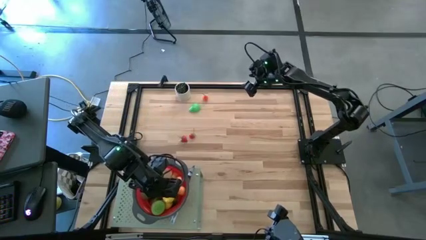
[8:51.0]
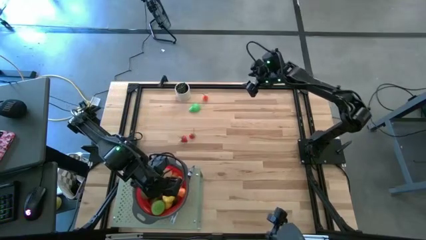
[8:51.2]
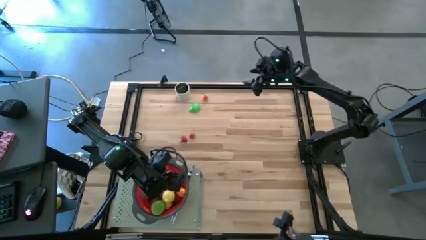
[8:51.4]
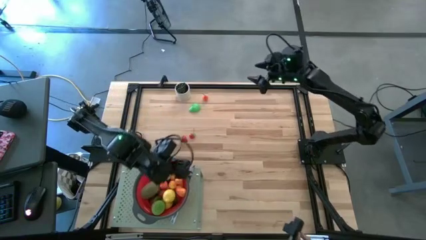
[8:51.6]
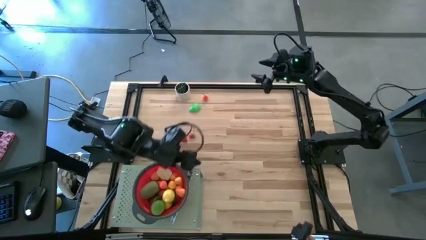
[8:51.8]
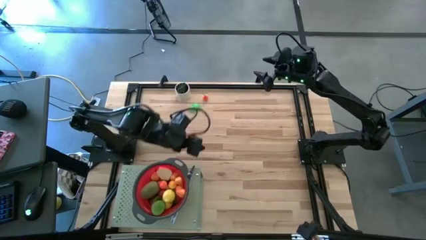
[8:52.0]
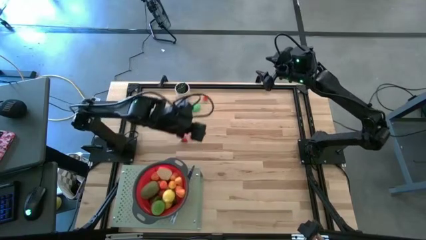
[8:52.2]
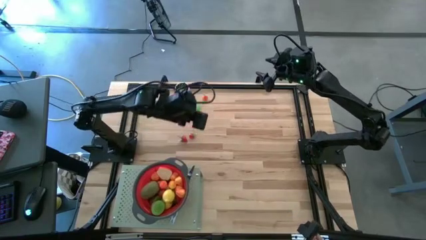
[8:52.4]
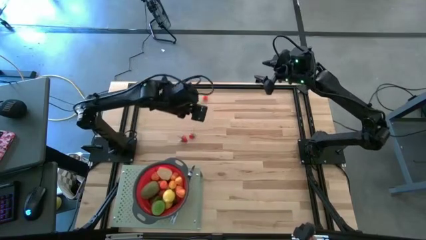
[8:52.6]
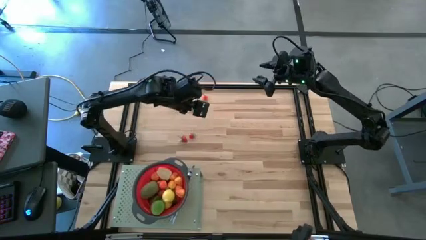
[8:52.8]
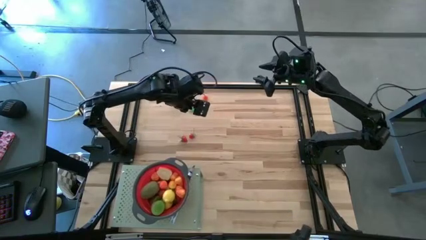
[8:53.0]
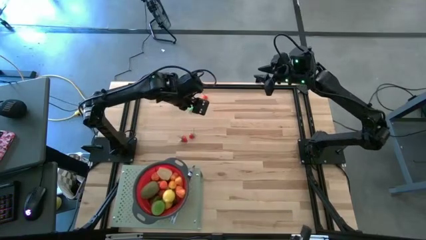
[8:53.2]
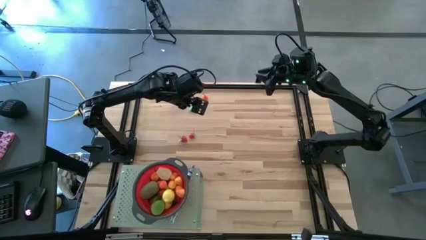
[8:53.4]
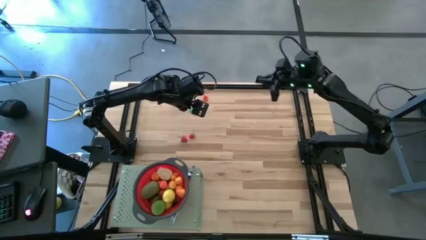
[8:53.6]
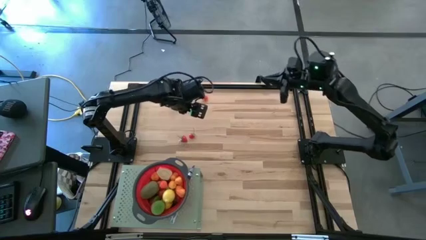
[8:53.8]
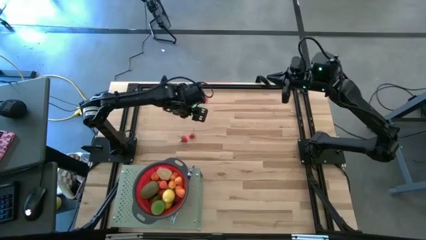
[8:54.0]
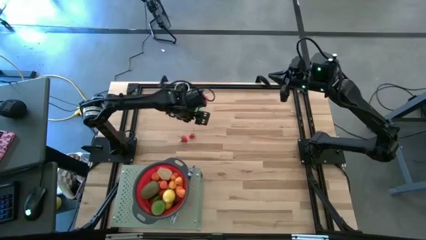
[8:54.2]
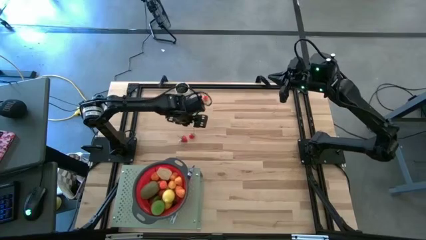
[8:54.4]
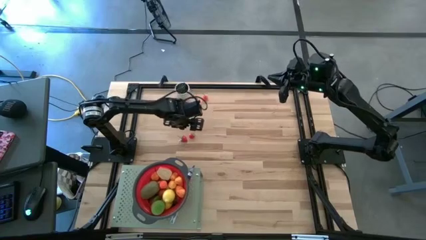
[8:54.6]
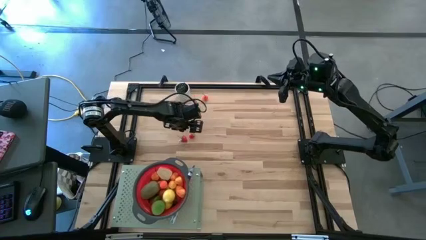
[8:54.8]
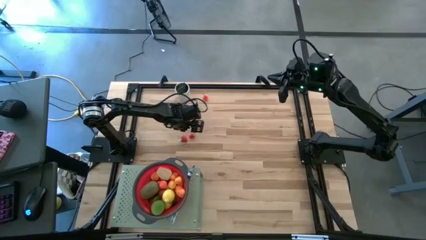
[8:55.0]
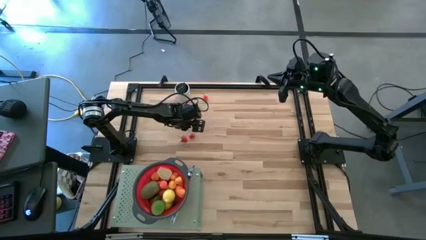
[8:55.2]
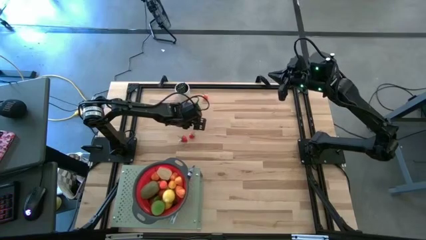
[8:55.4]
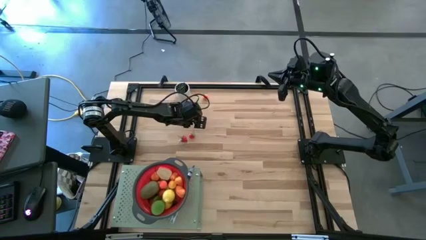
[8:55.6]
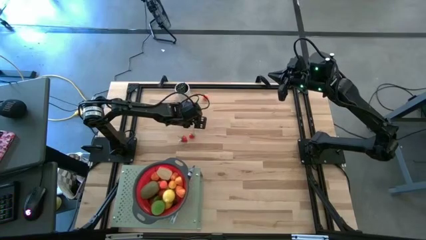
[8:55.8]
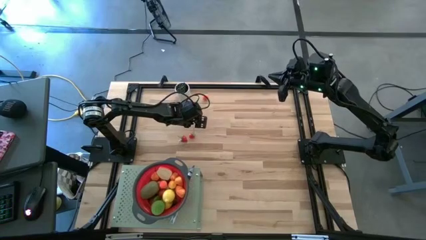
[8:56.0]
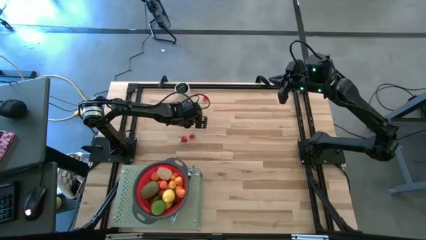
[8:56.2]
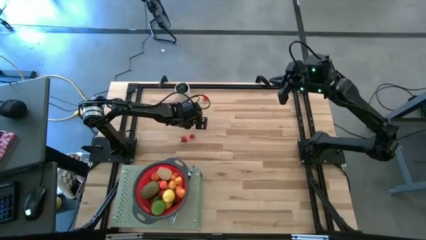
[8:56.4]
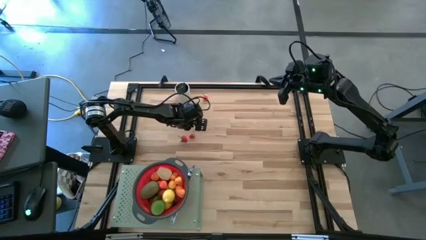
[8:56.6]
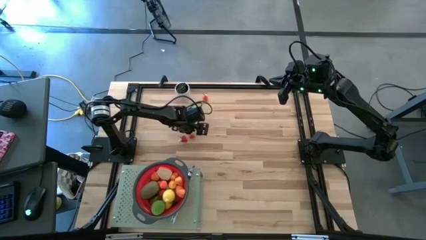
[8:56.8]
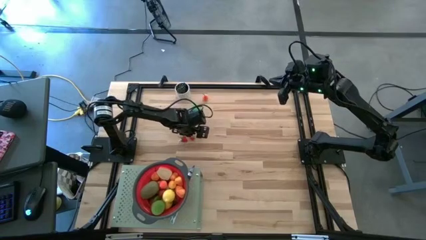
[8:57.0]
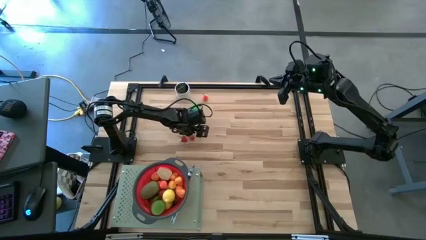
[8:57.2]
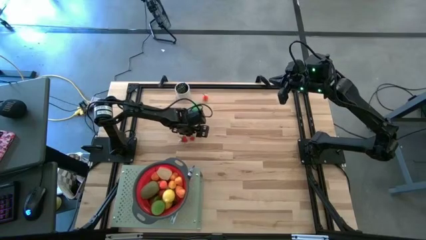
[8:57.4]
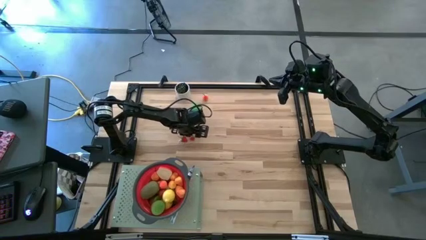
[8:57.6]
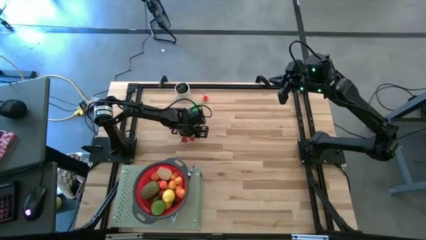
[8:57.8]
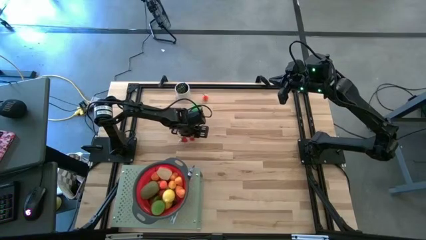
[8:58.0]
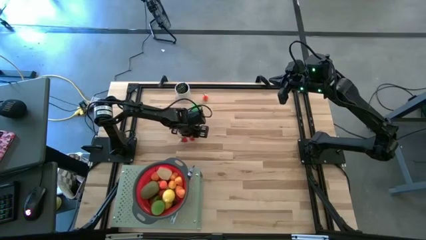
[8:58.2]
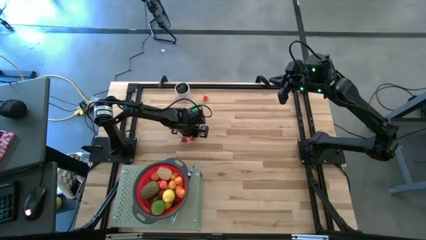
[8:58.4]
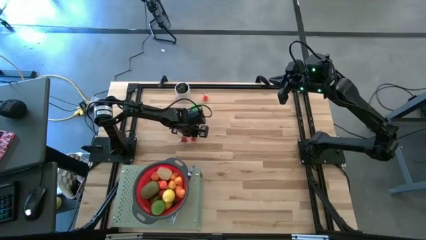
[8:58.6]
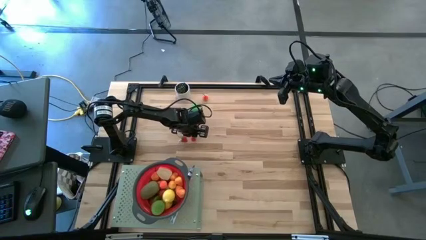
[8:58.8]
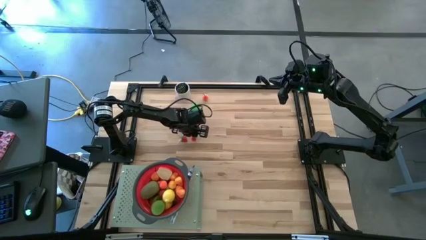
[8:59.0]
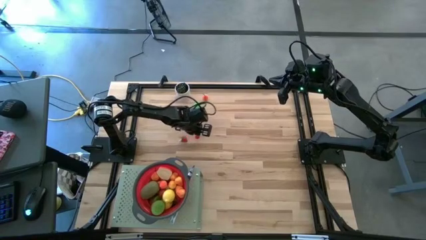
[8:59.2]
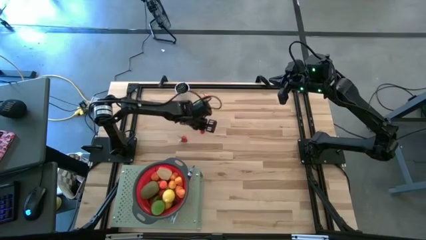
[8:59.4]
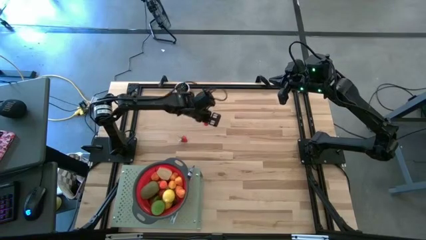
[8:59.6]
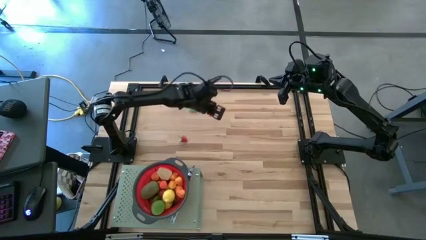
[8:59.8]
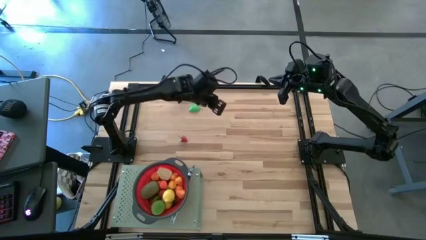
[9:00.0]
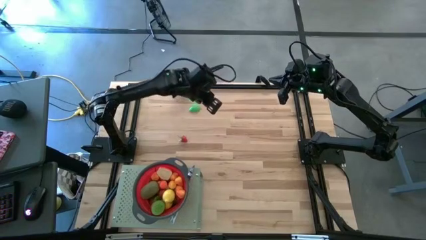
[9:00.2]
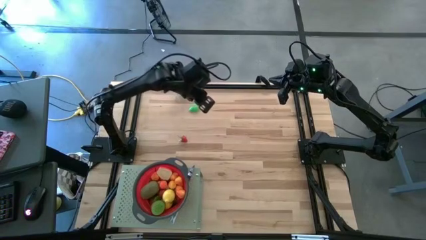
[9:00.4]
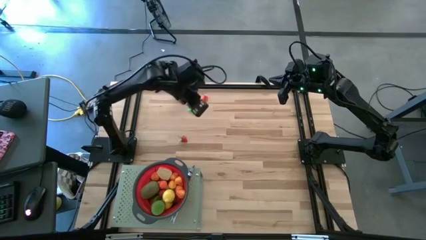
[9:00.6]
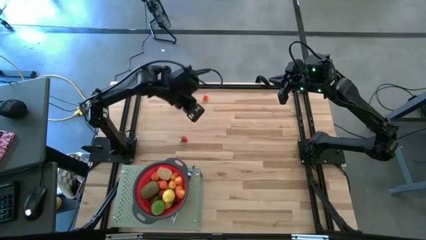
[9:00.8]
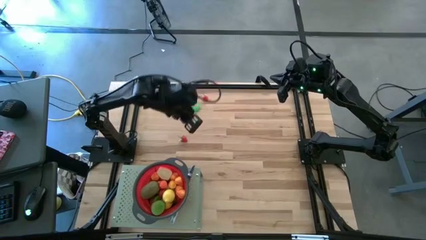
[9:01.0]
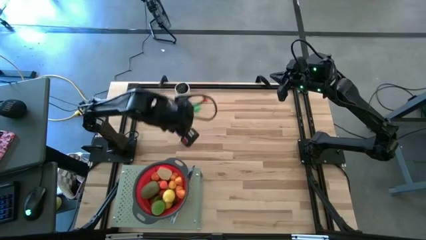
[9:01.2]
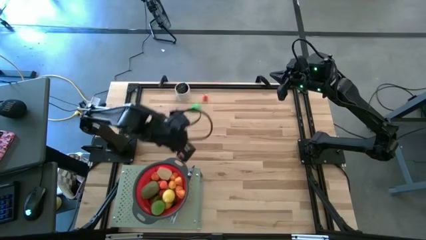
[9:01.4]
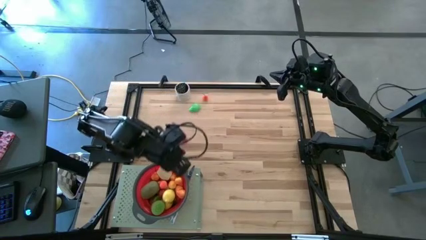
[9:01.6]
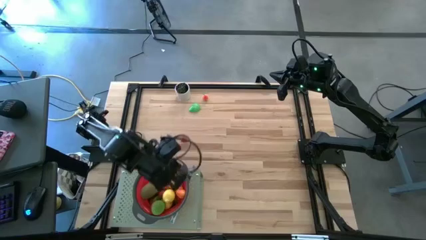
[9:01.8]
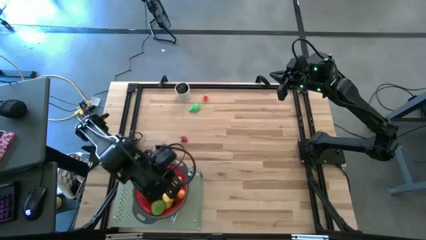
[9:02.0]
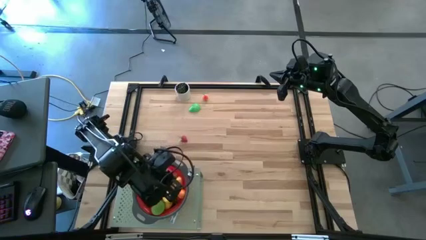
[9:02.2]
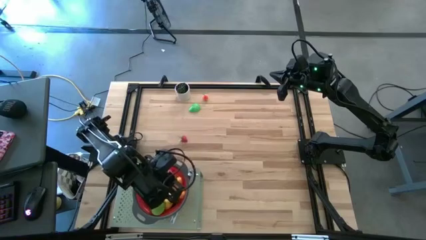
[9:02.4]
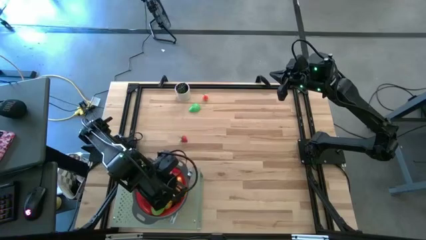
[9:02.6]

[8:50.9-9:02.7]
Task: Pick & Place Fruit
Put the strawberry into the red strainer bowl on the shelf

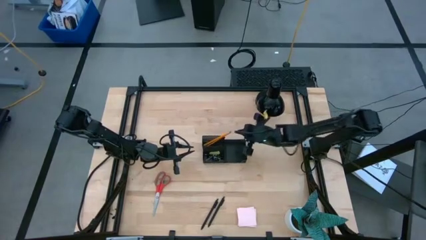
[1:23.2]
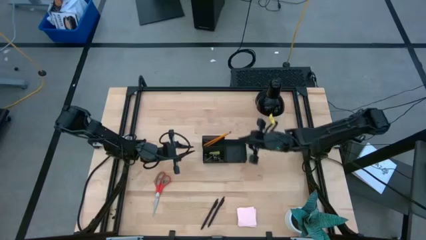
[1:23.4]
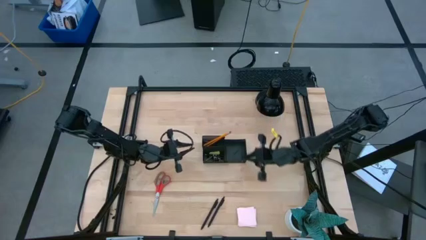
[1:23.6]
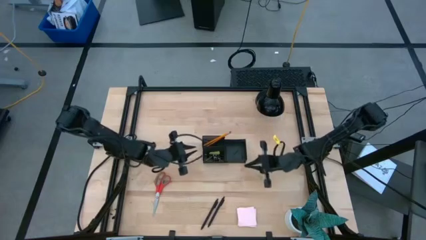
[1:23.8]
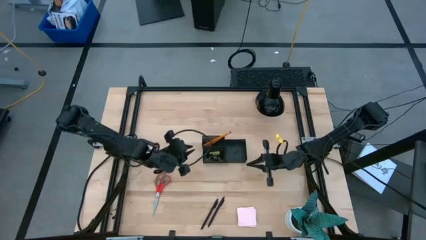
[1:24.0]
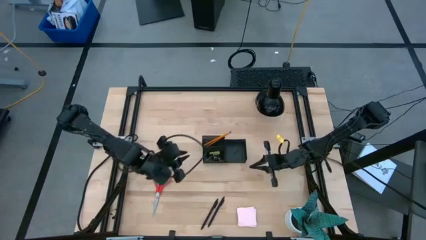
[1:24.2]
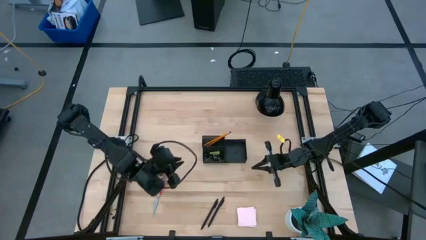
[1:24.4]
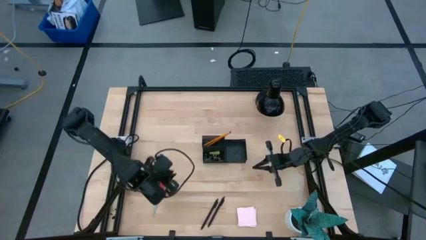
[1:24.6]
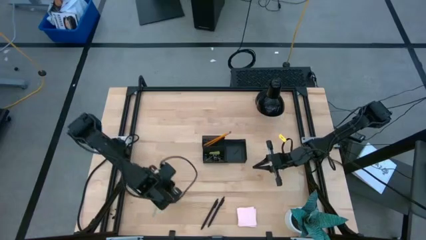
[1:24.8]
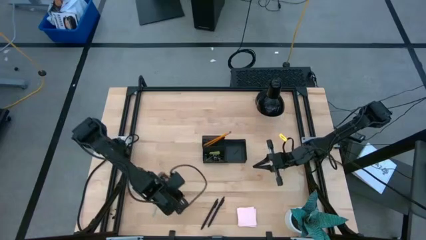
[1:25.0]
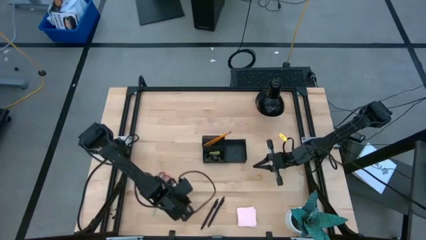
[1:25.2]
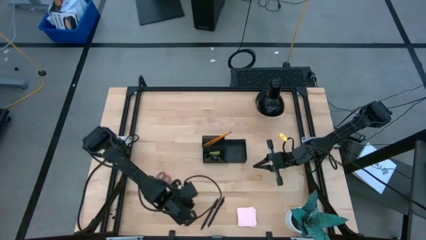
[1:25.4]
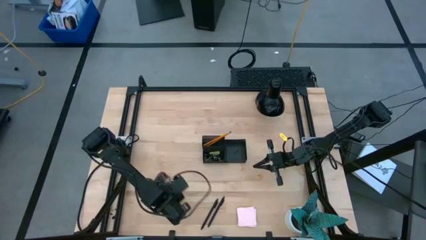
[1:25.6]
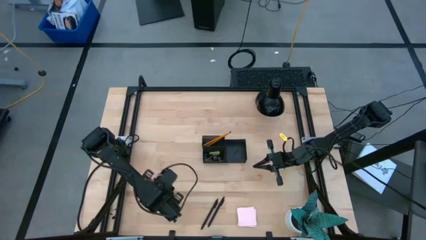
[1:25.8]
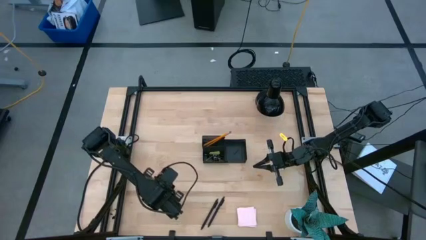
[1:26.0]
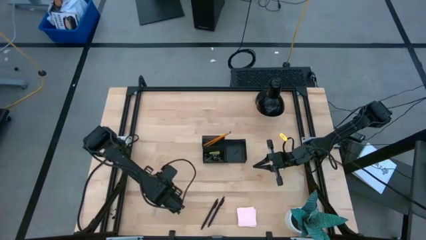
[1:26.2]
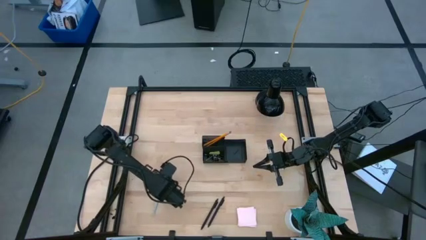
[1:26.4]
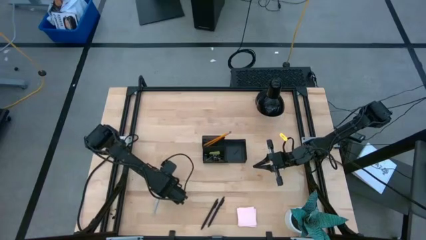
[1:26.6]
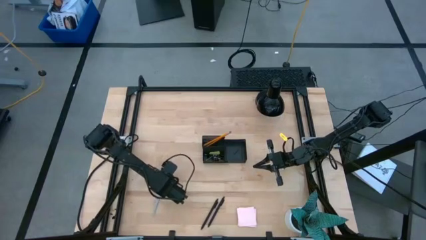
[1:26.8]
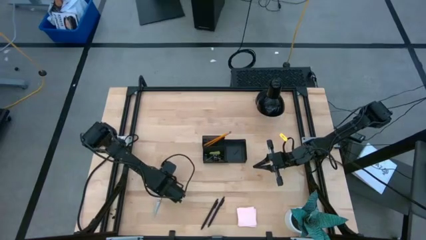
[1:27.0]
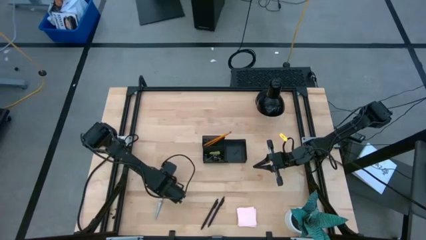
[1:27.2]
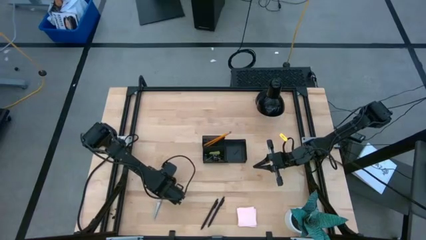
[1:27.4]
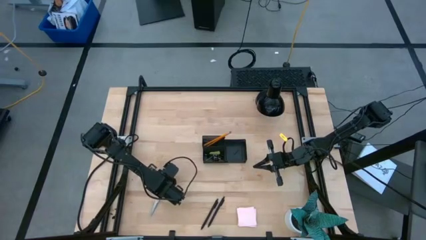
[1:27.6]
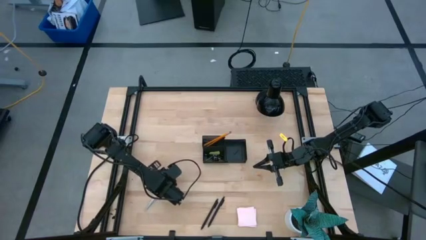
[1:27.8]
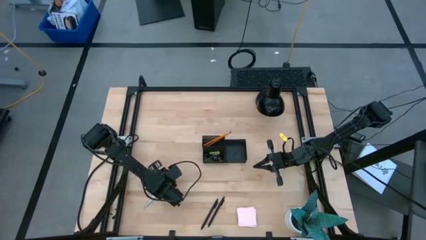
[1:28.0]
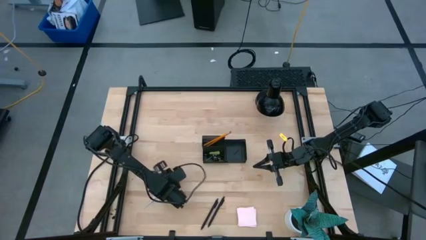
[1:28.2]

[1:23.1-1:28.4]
Task: Pick and place office supplies into organizer
Put the red scissors into the black desk organizer
